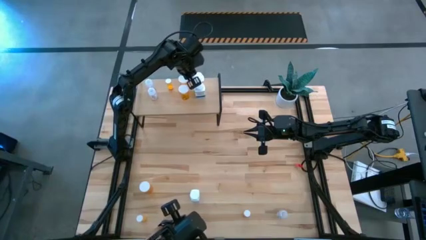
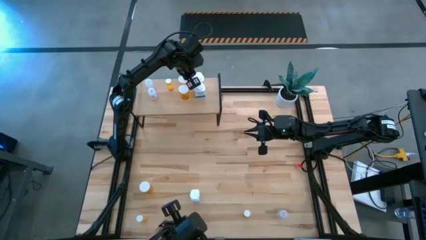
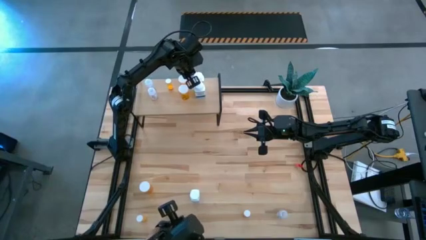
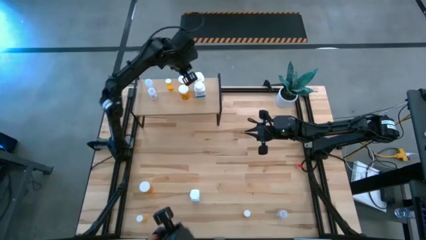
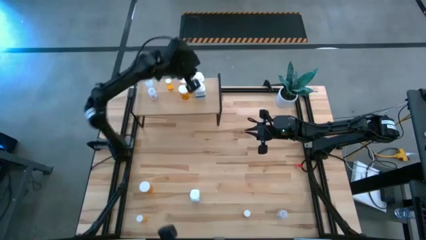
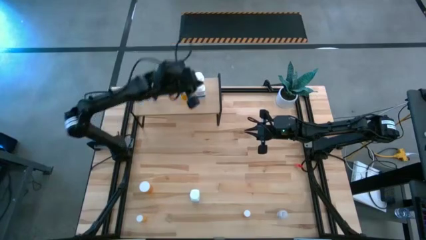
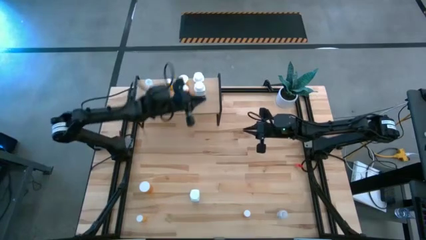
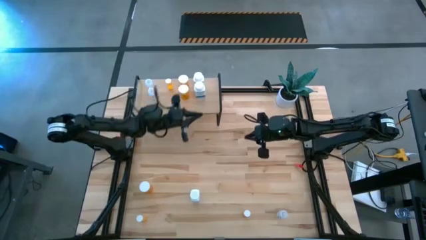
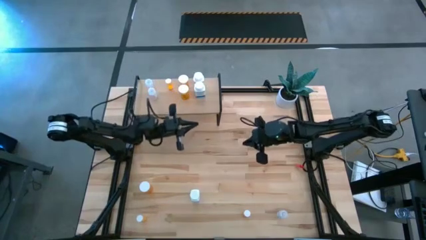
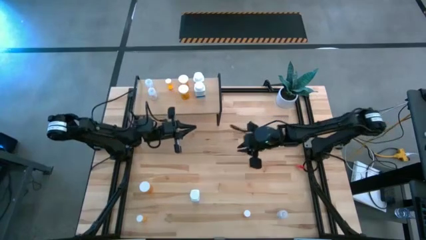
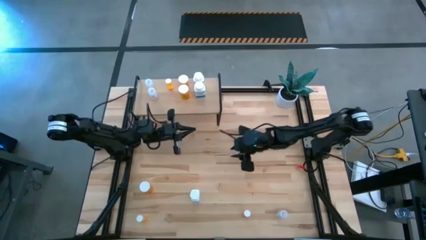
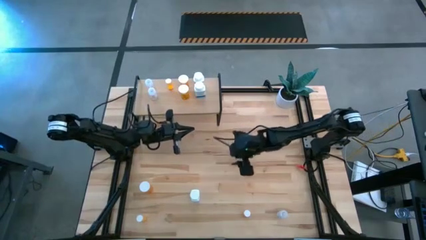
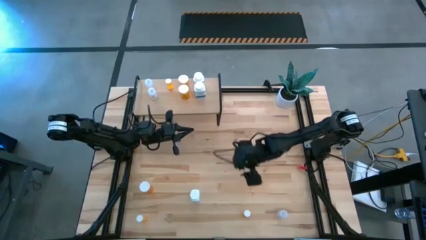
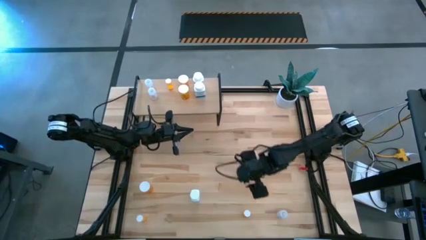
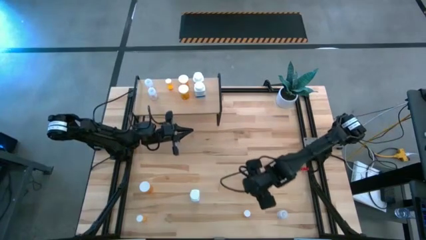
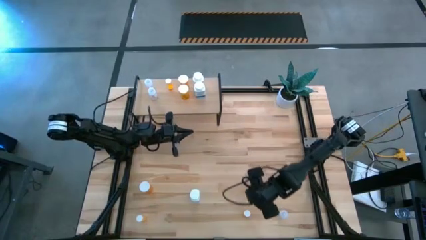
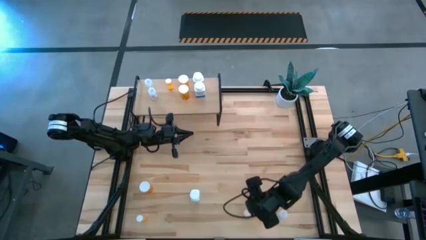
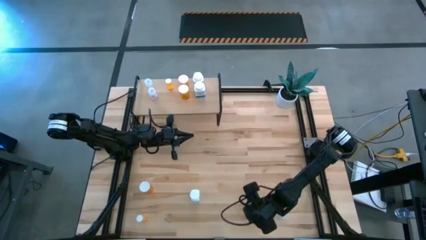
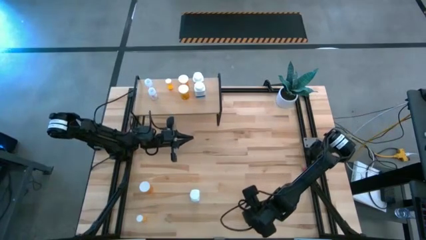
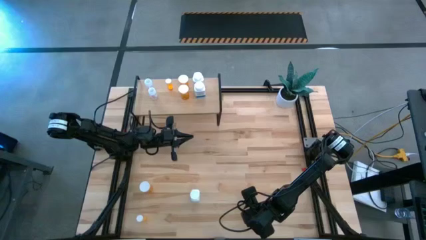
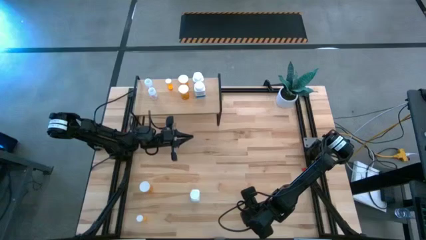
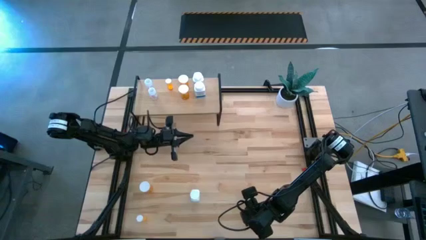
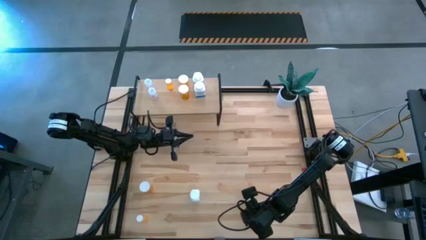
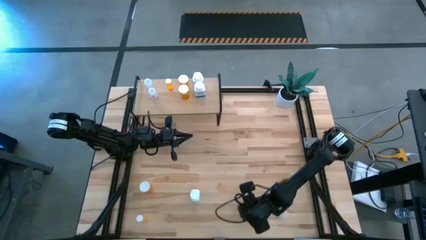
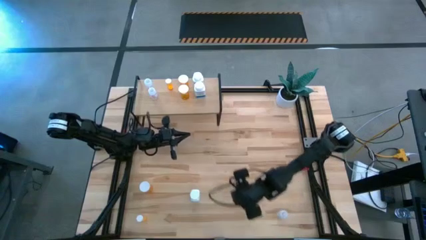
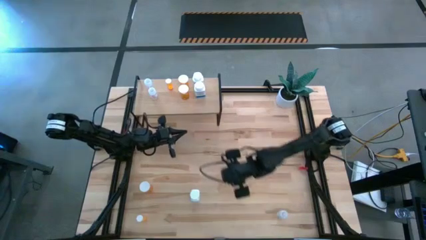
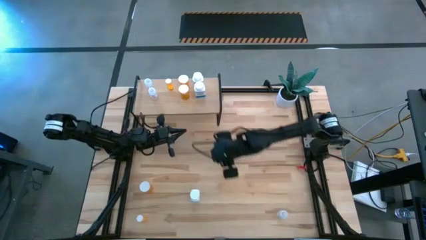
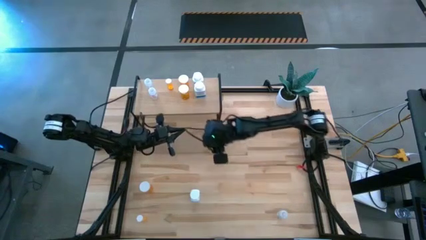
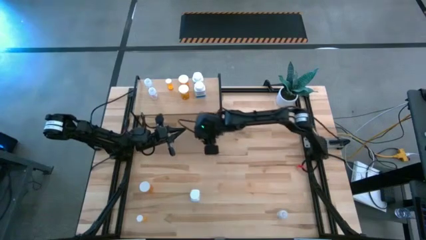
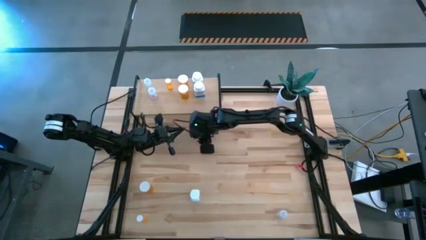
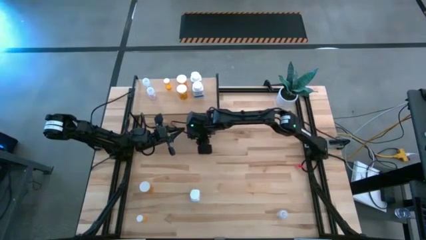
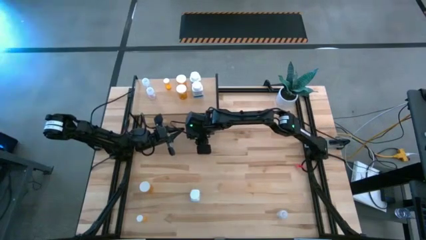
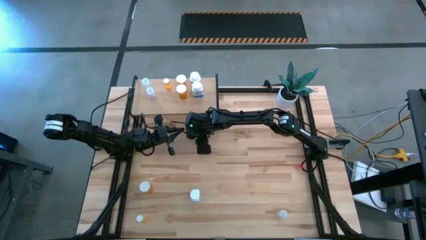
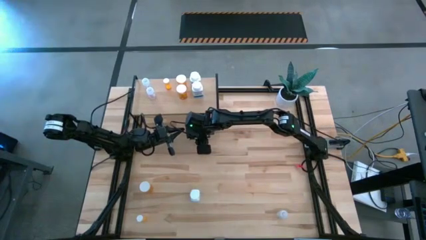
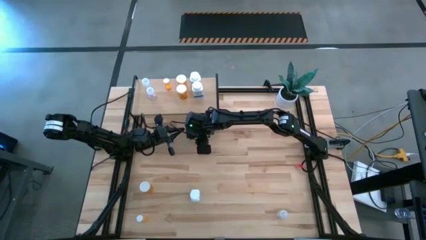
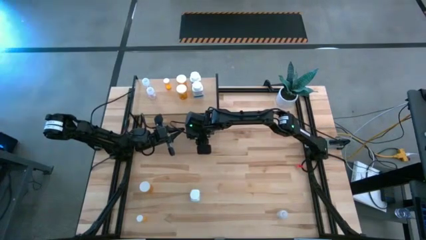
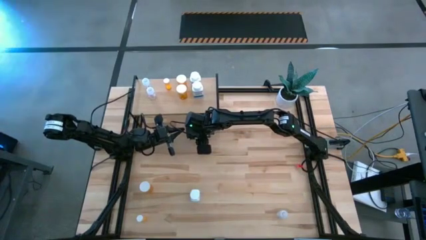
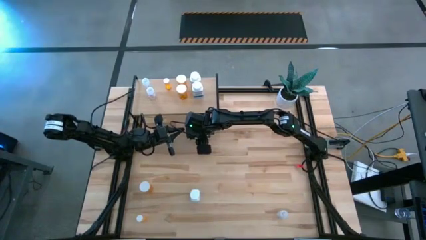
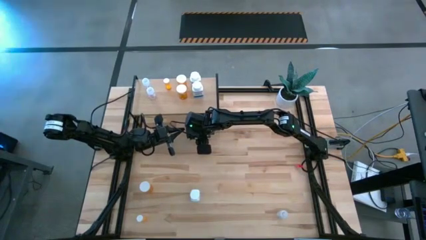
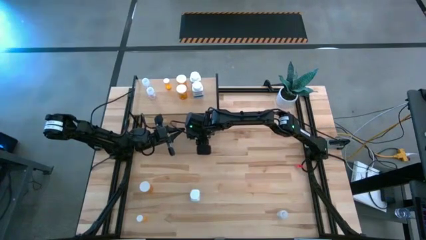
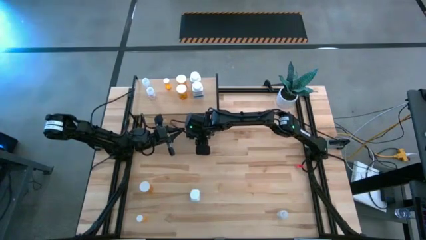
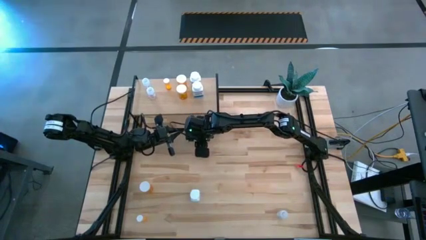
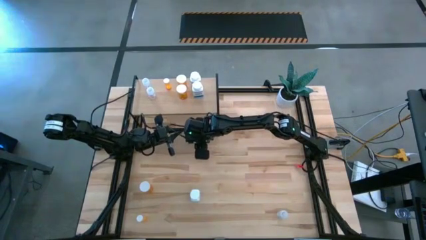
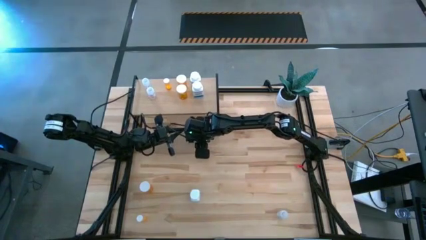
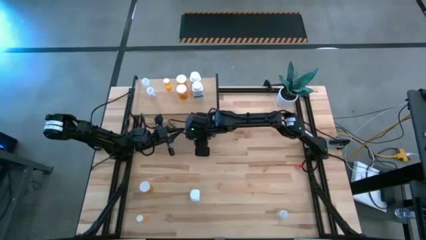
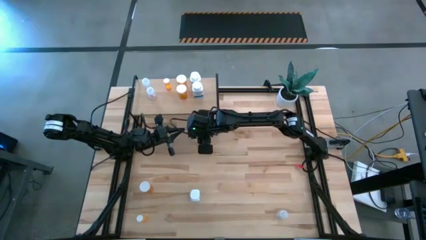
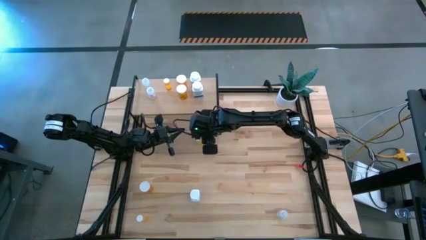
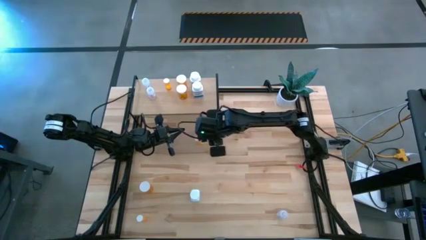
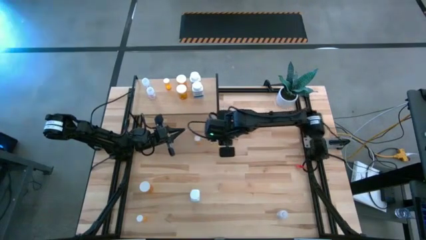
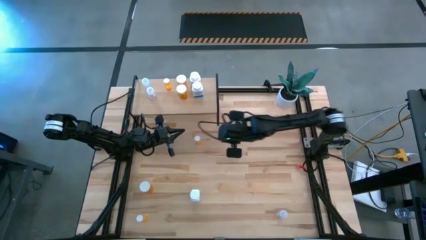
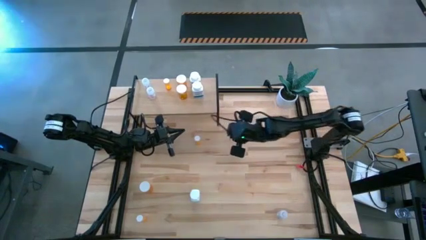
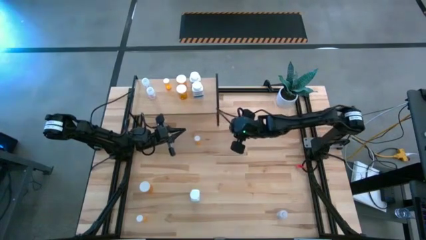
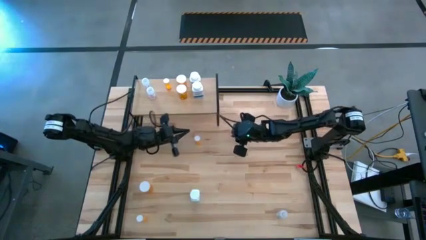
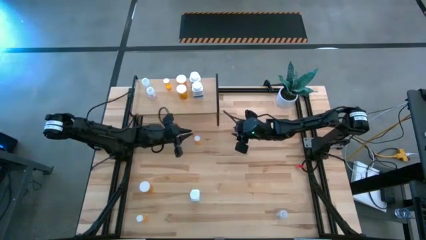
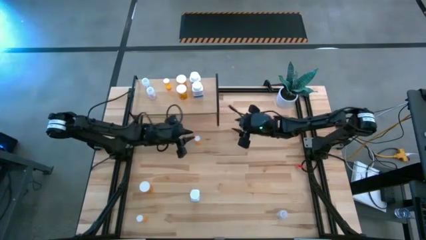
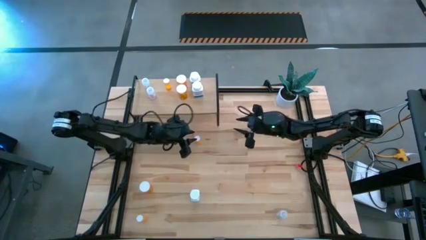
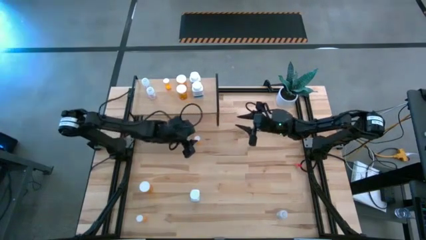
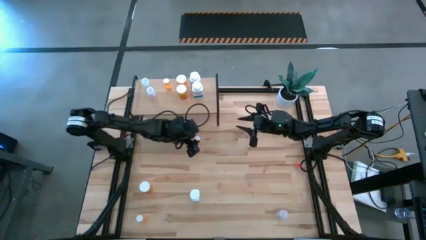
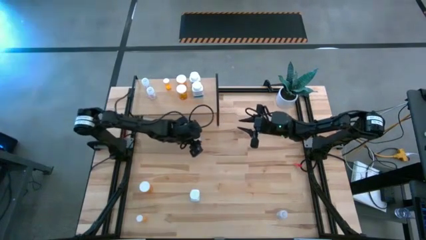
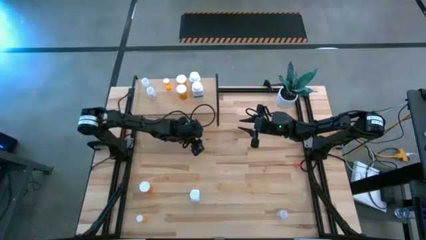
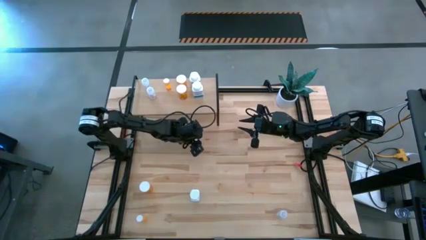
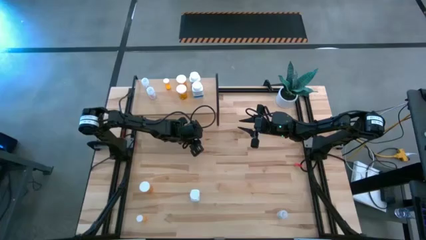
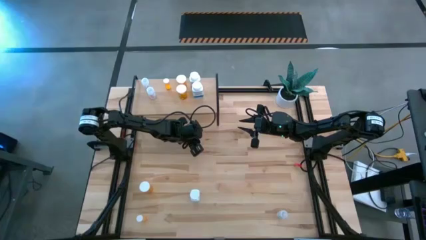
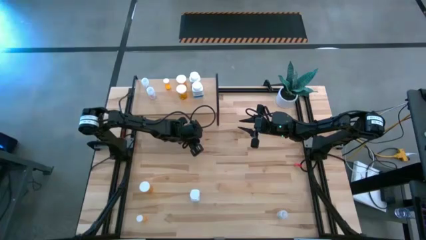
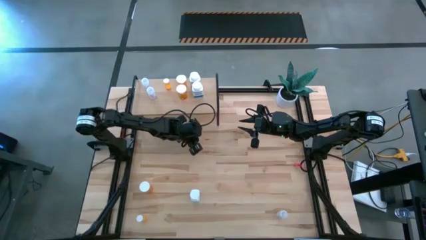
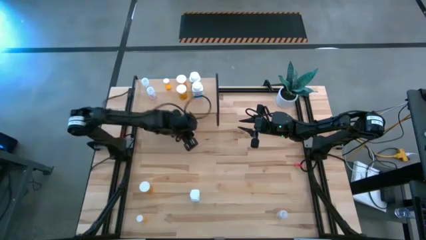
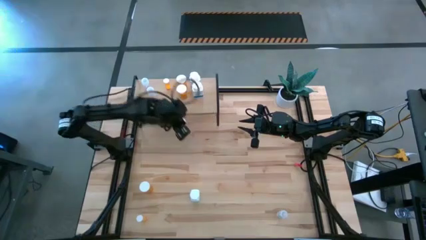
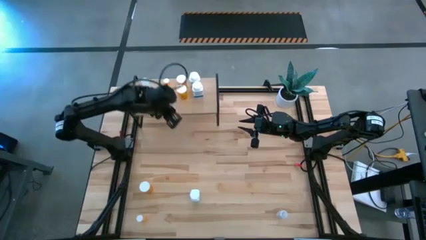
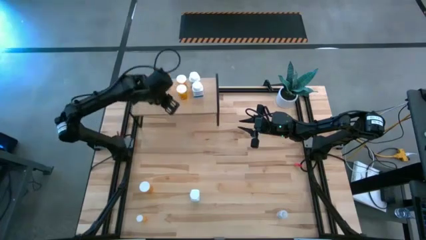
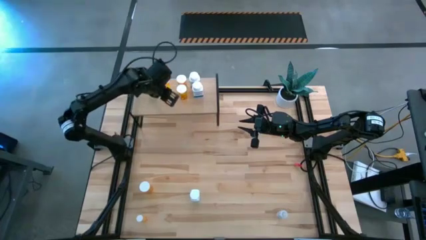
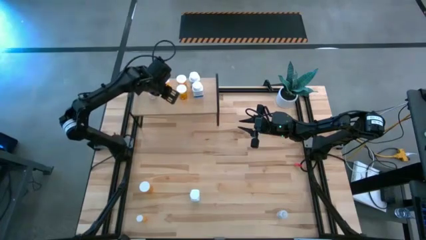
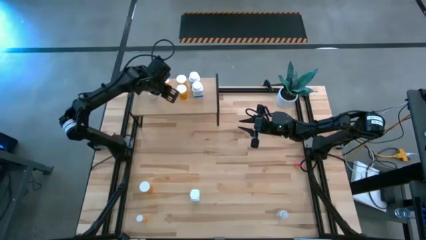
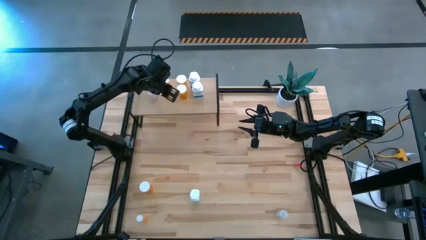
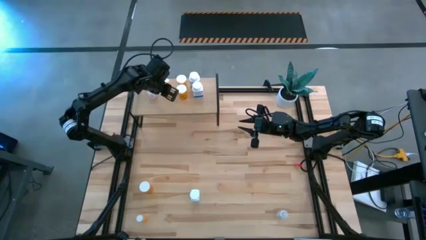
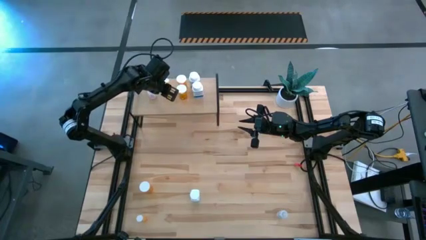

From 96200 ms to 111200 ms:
Task: Pick and place medicine bottles onto shelf by color
Put the right small orange pill bottle aligned with the other small orange pill bottle on the shelf
